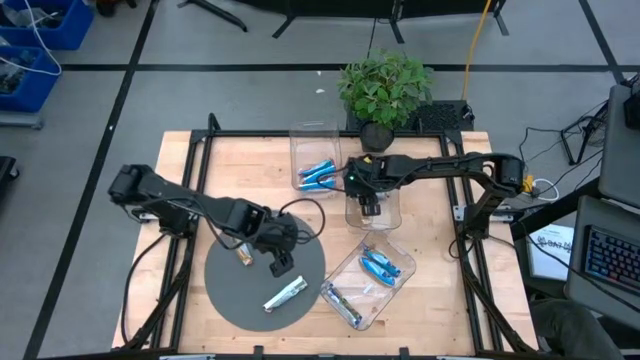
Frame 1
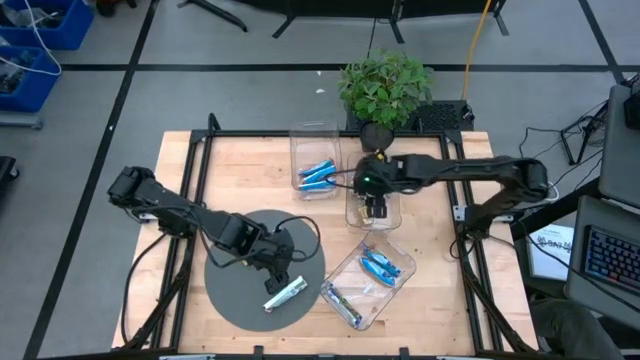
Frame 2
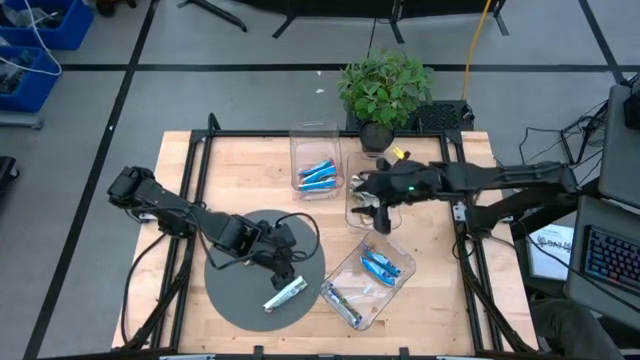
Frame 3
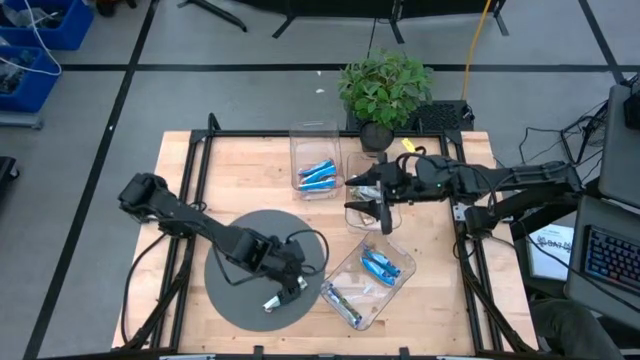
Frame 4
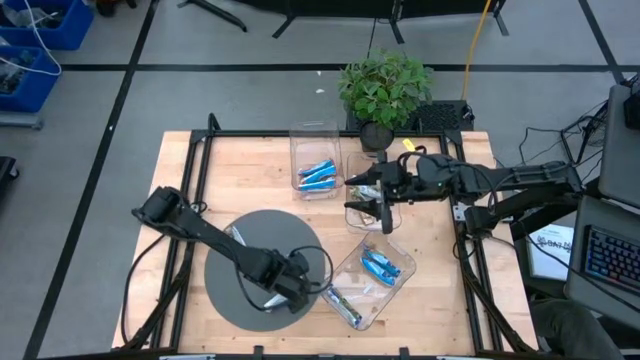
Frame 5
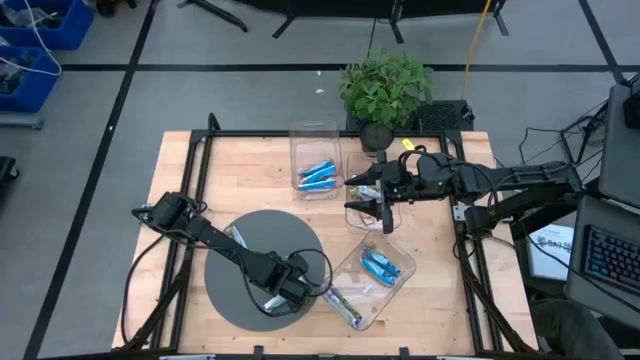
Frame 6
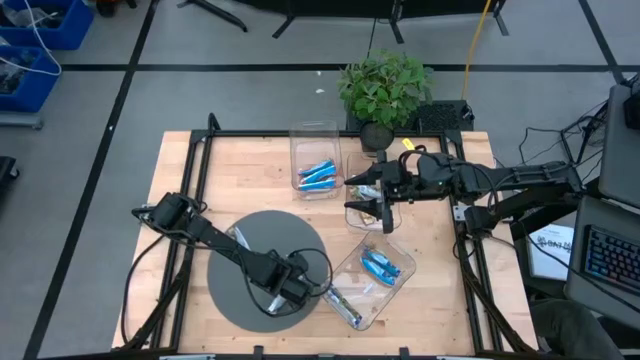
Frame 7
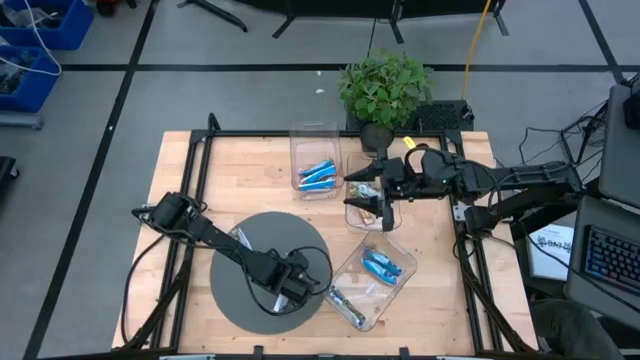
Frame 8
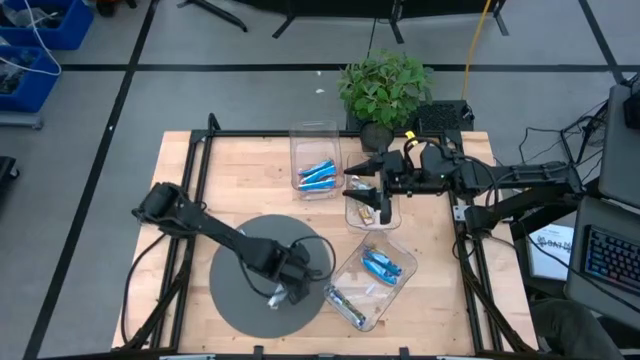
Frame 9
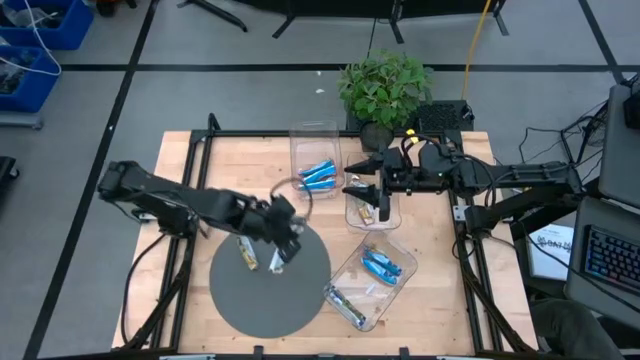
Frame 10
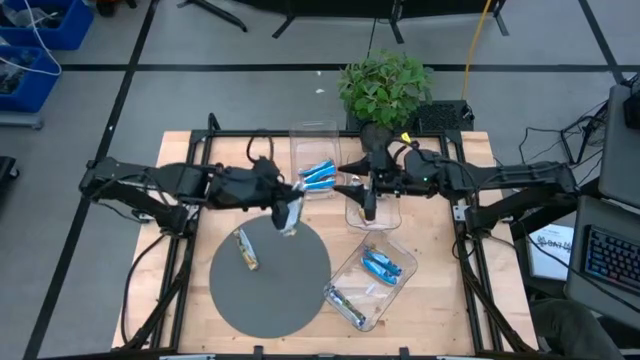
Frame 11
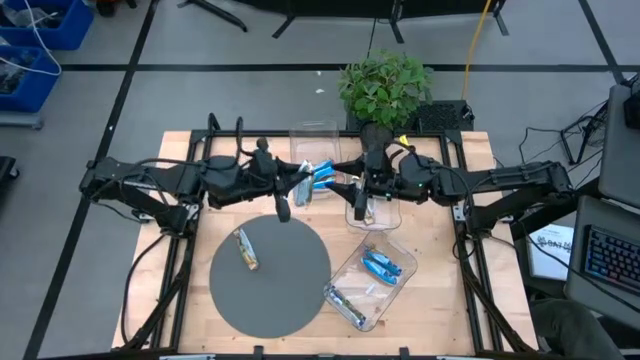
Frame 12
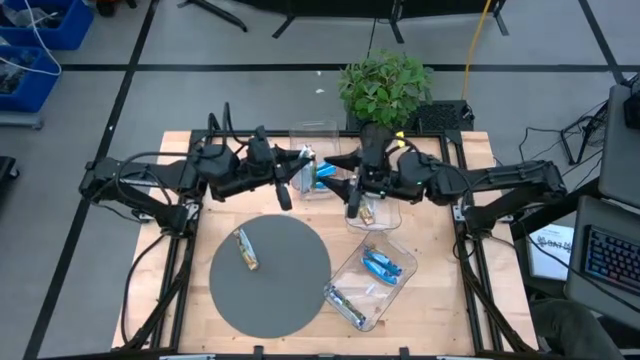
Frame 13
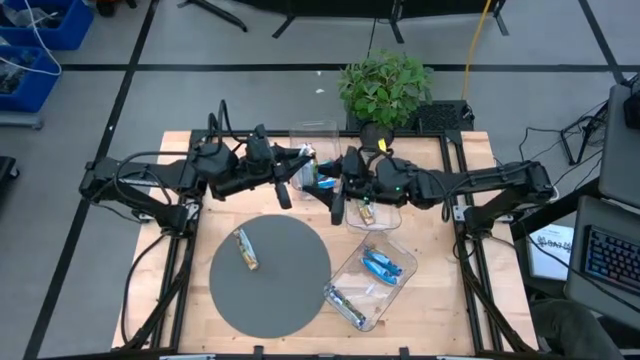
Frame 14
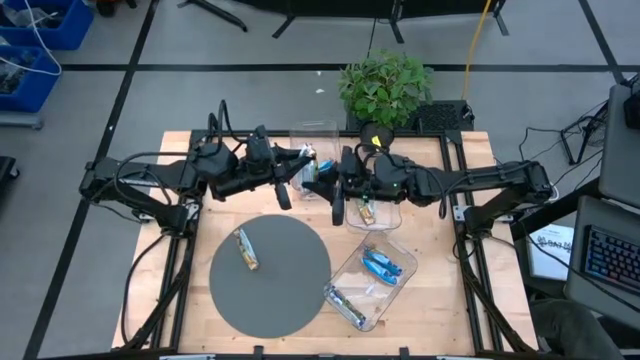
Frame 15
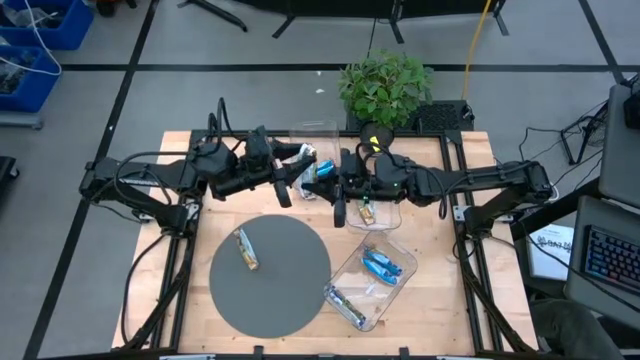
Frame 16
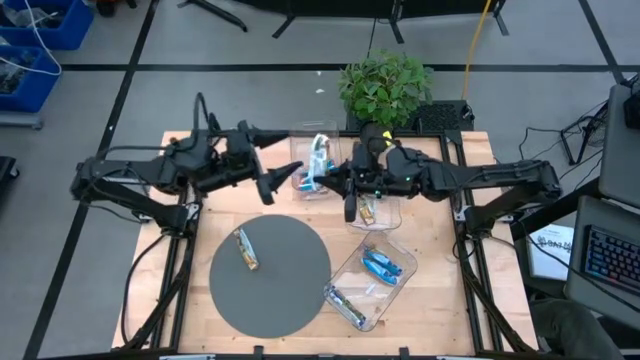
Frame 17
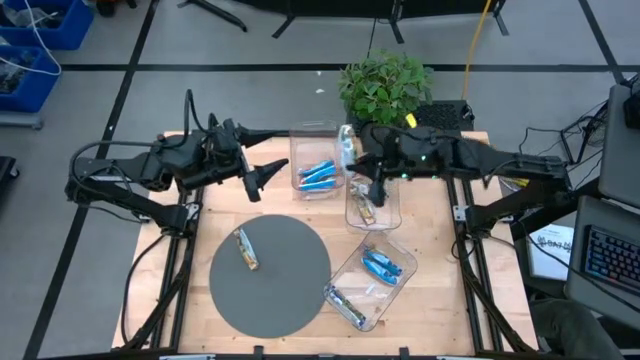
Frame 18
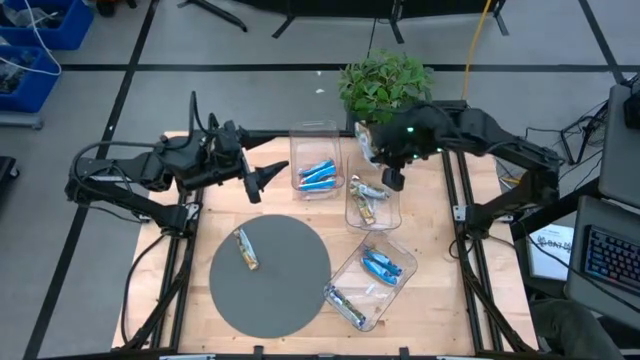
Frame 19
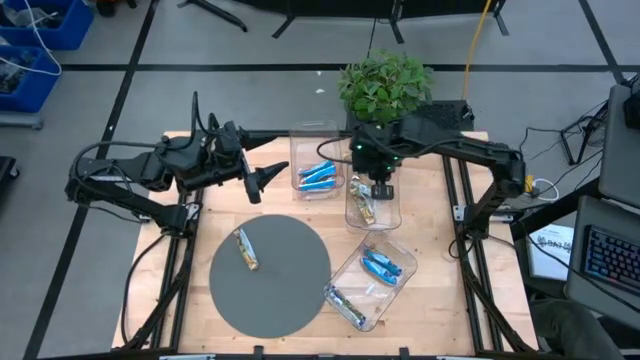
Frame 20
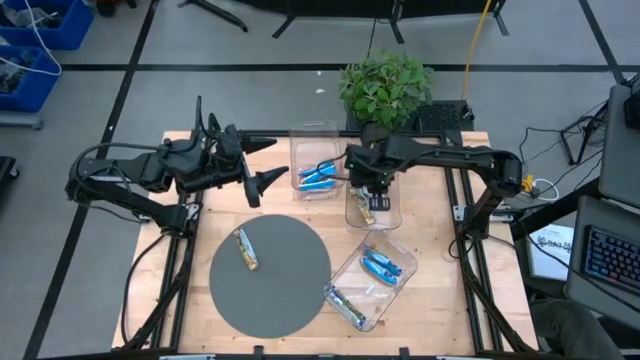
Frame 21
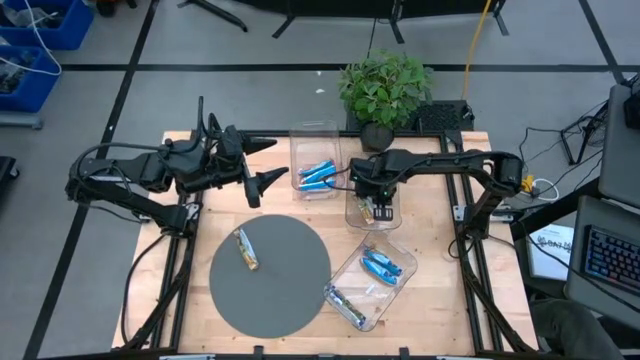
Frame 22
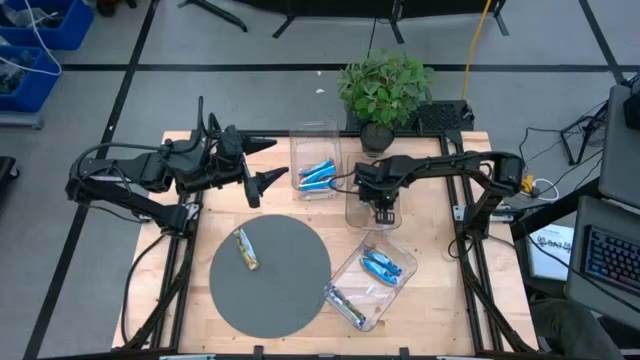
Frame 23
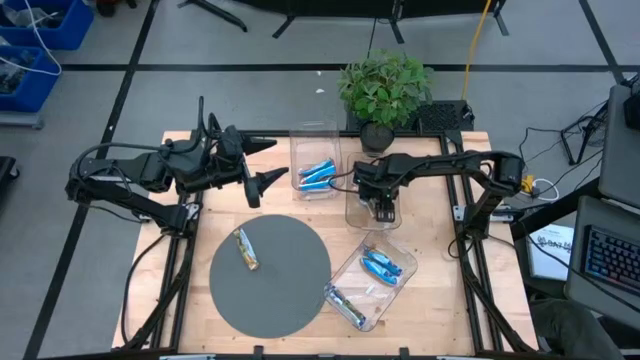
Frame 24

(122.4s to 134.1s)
Task: Pick and place Granola Bars by type
Put the yellow granola bar into the middle transparent bin

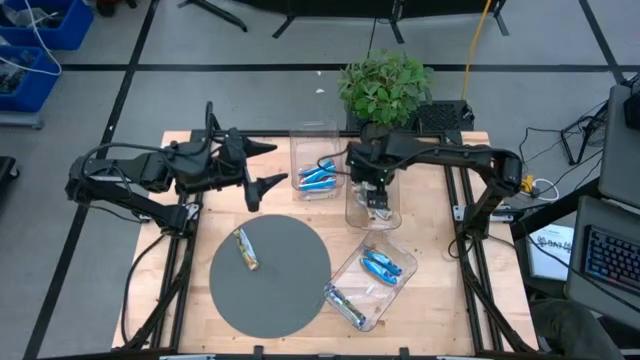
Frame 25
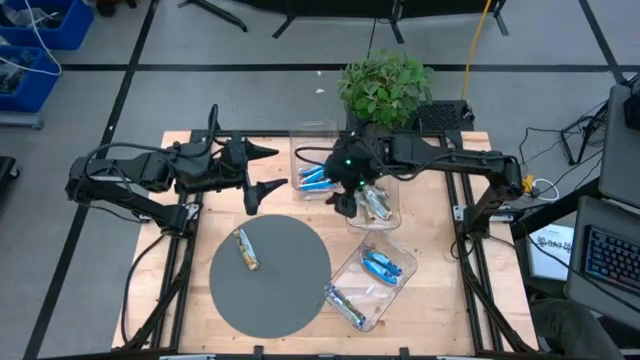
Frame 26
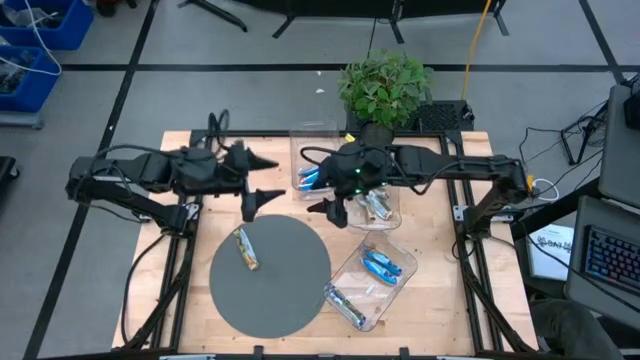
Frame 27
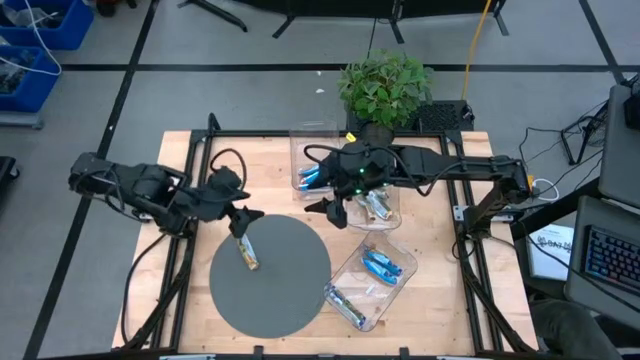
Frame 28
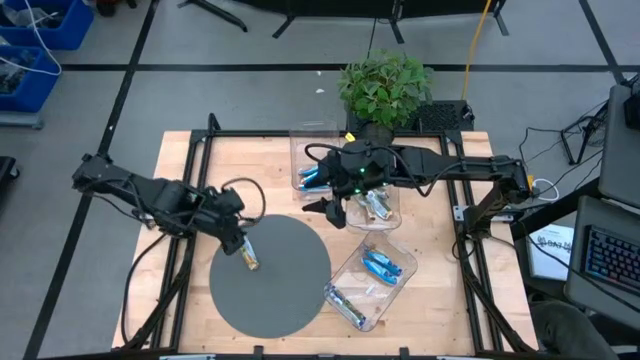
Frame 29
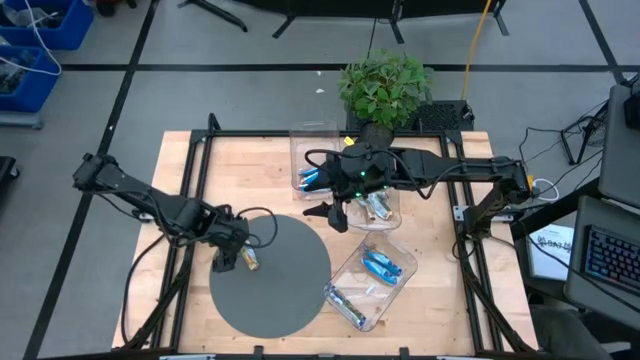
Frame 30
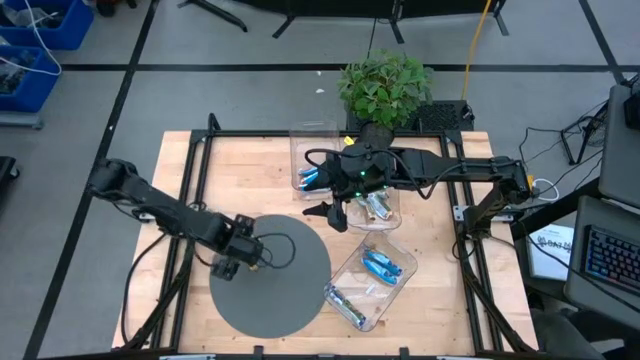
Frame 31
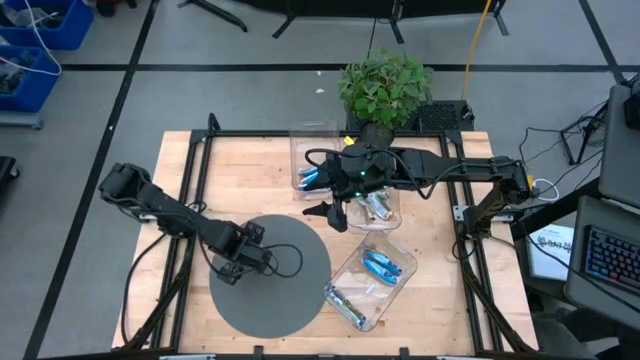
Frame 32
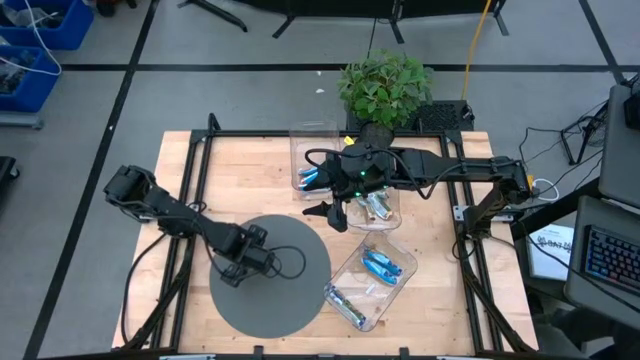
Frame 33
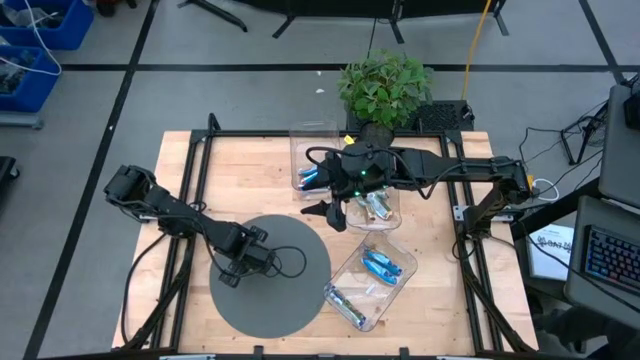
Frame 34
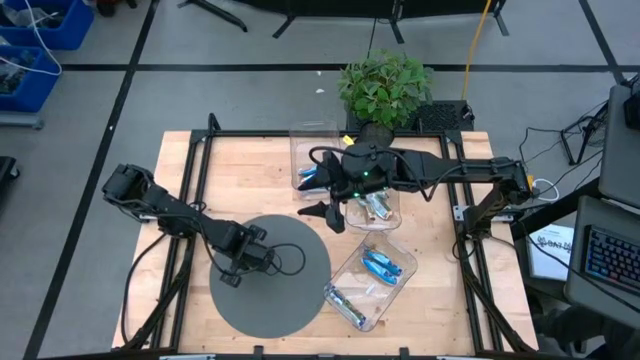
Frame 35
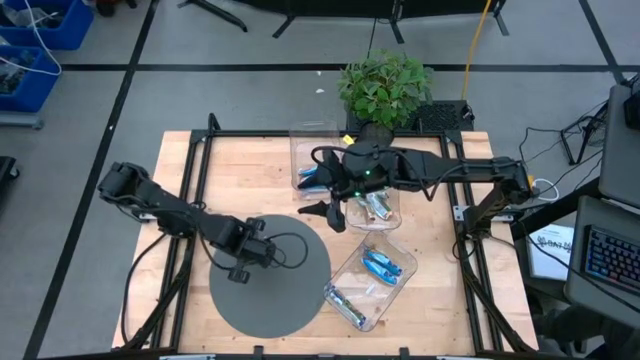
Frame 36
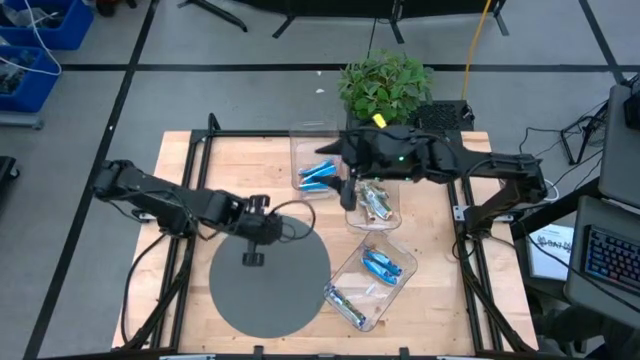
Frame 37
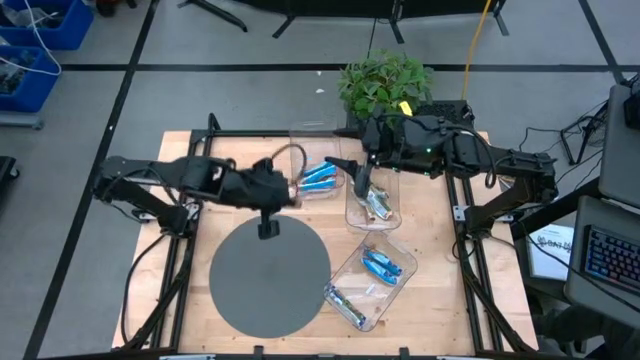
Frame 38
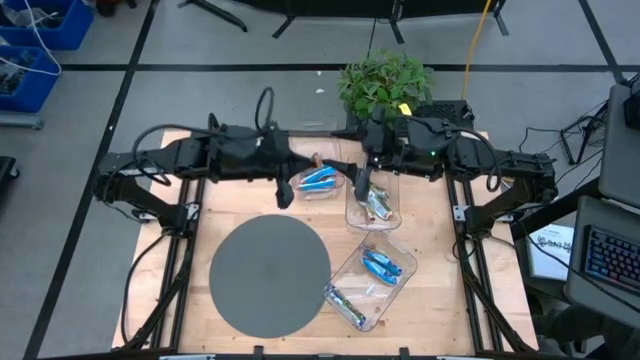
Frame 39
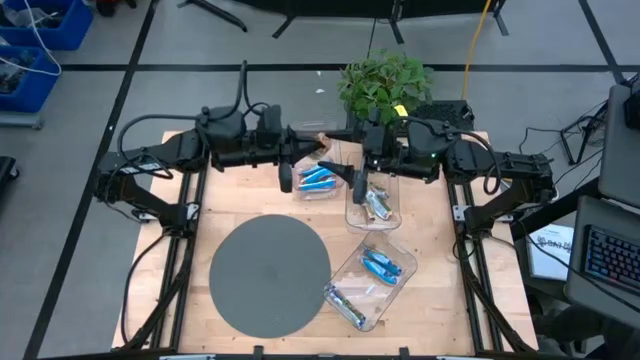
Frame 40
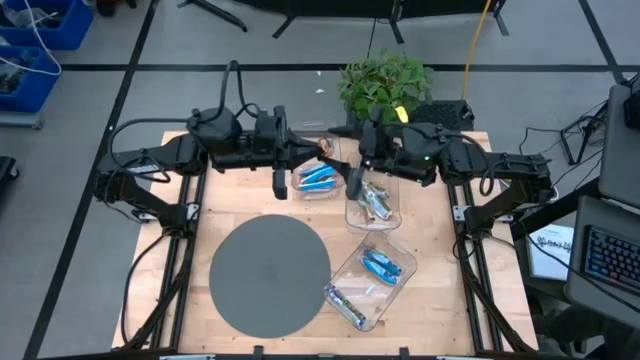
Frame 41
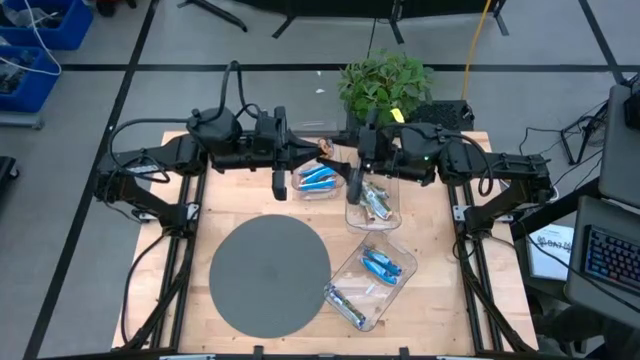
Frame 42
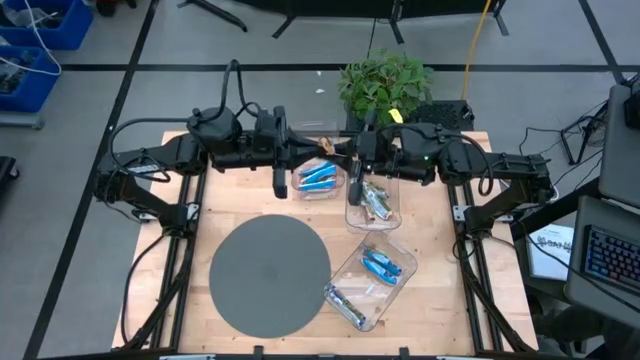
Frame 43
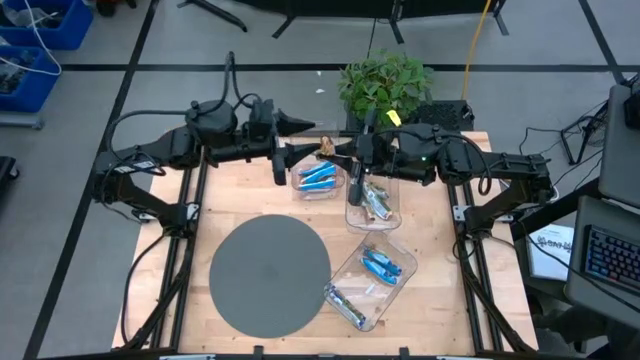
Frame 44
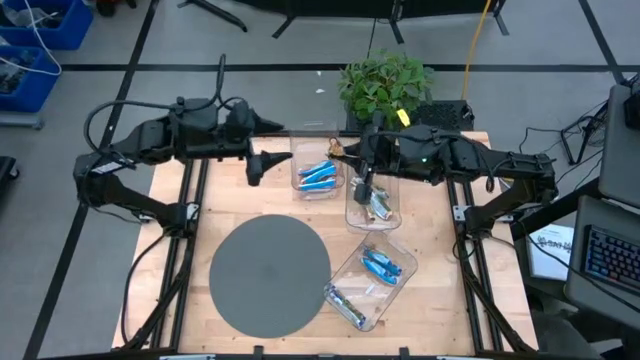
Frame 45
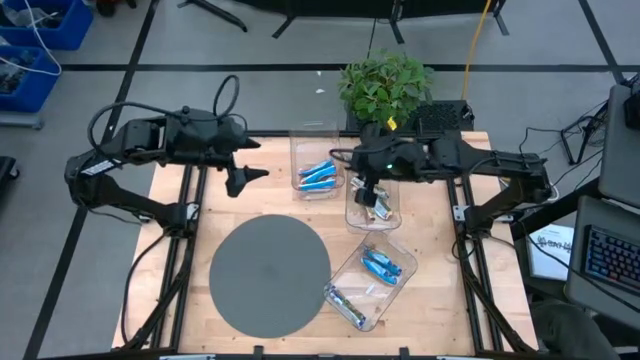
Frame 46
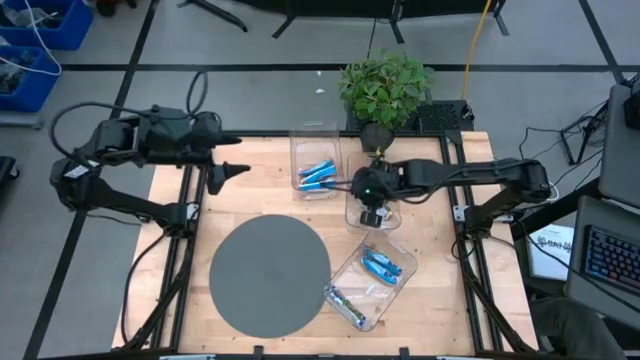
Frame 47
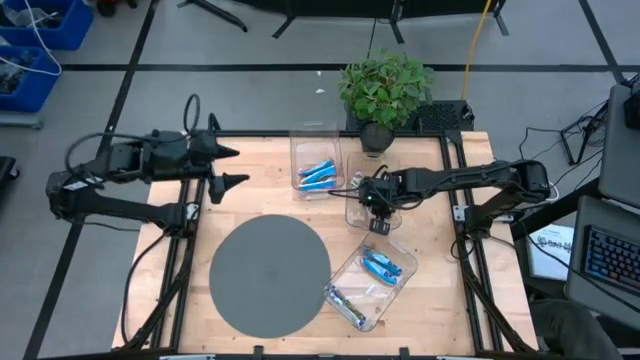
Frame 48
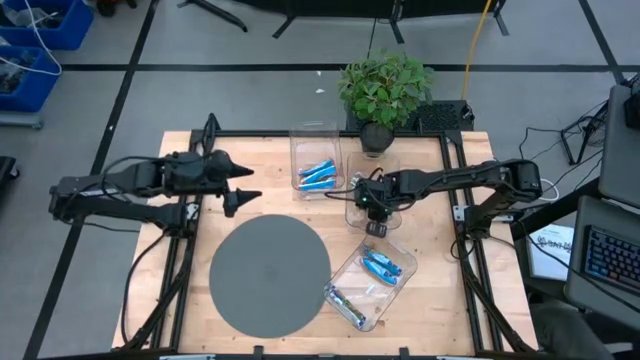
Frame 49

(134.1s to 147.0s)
Put the yellow granola bar into the middle transparent bin
